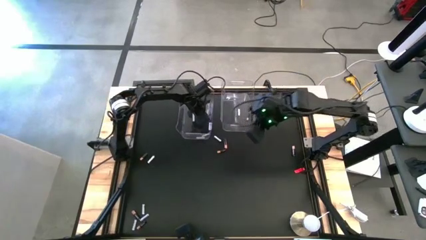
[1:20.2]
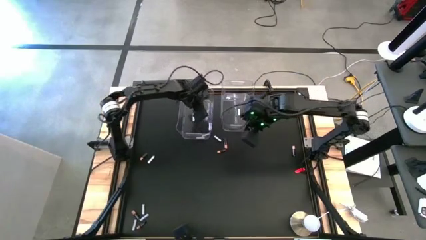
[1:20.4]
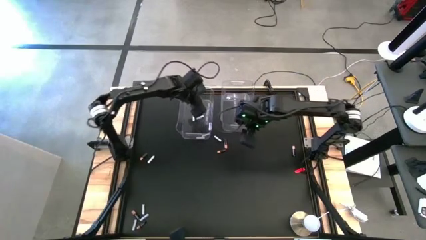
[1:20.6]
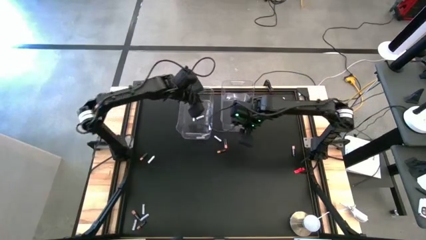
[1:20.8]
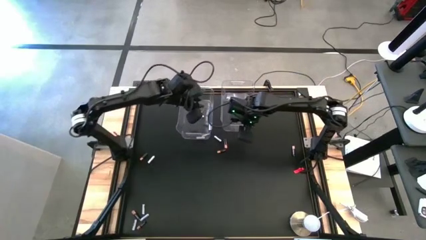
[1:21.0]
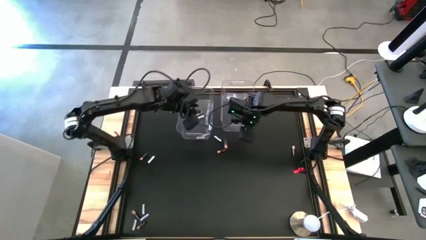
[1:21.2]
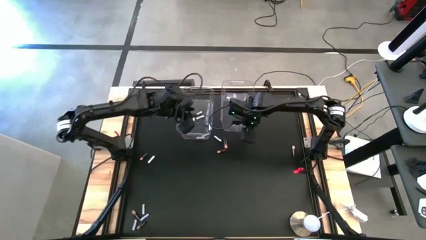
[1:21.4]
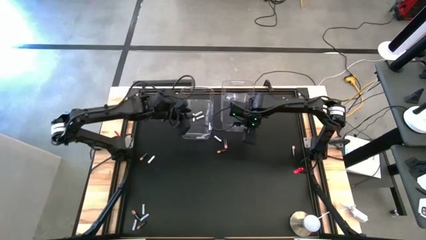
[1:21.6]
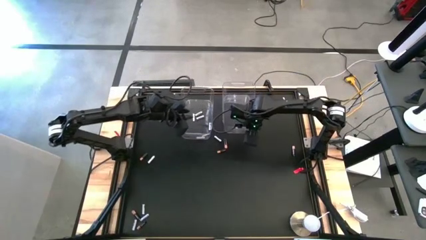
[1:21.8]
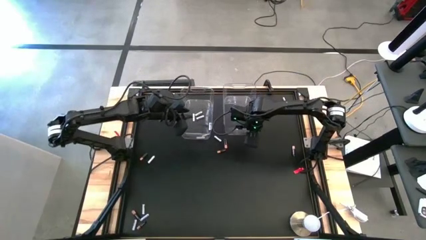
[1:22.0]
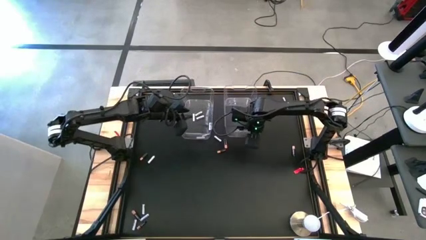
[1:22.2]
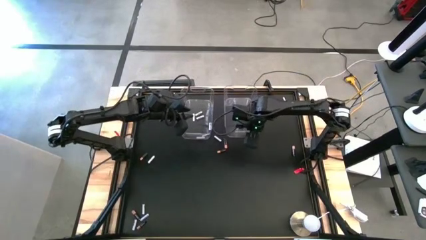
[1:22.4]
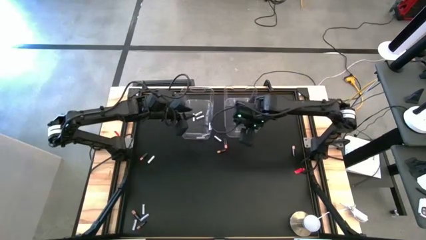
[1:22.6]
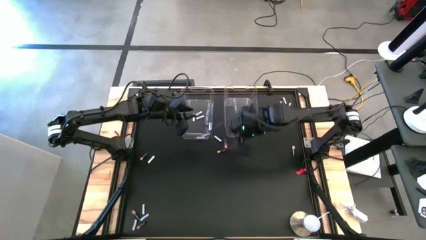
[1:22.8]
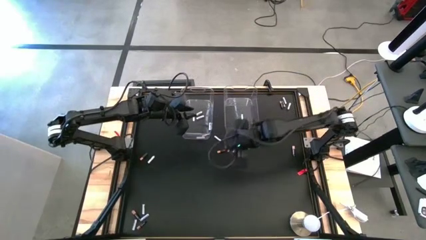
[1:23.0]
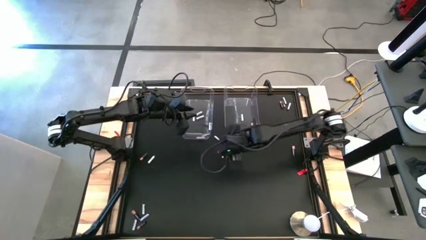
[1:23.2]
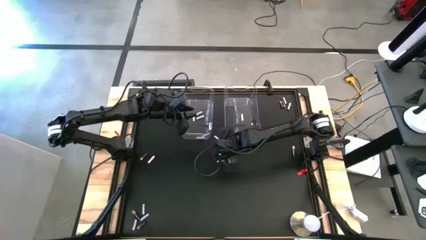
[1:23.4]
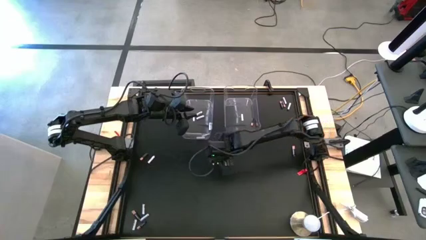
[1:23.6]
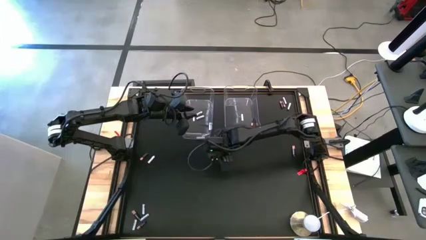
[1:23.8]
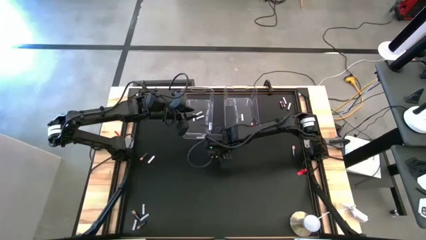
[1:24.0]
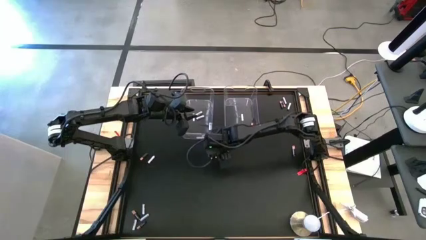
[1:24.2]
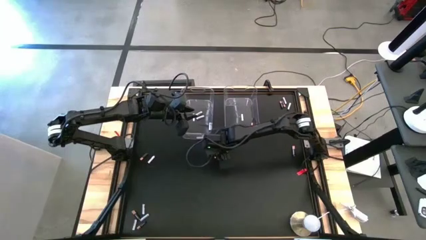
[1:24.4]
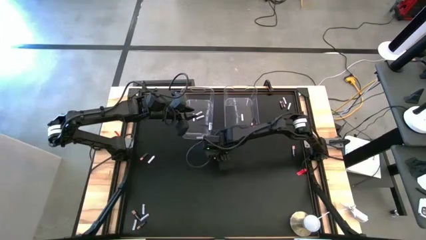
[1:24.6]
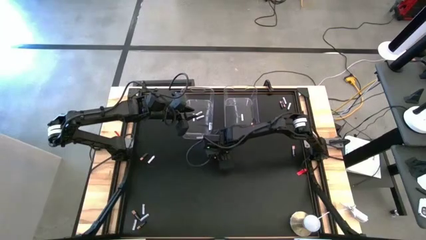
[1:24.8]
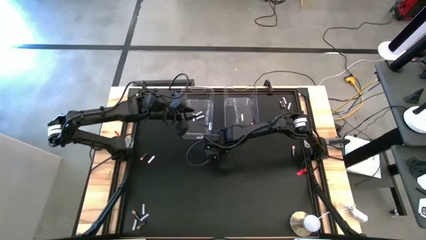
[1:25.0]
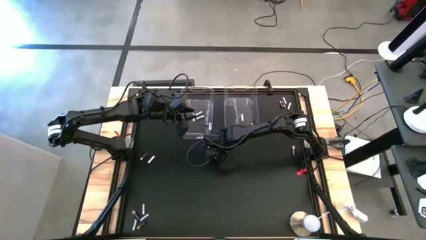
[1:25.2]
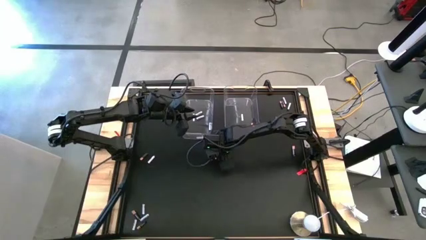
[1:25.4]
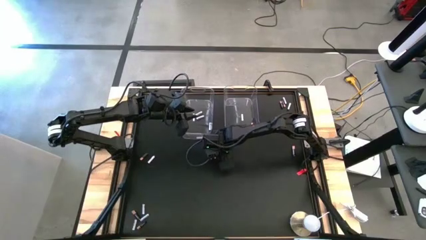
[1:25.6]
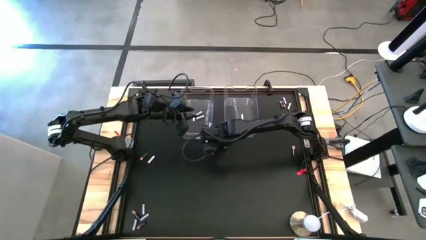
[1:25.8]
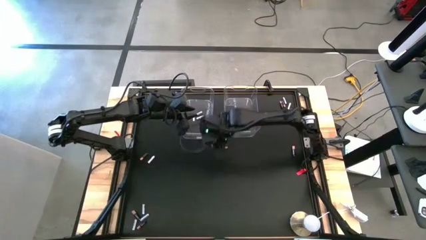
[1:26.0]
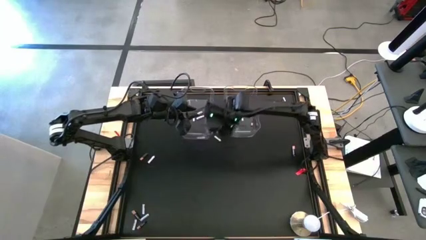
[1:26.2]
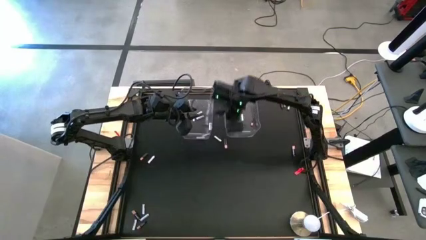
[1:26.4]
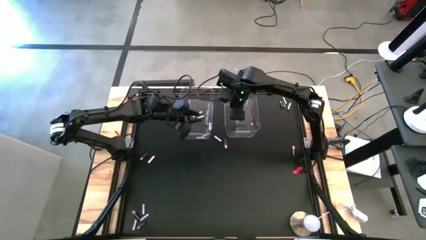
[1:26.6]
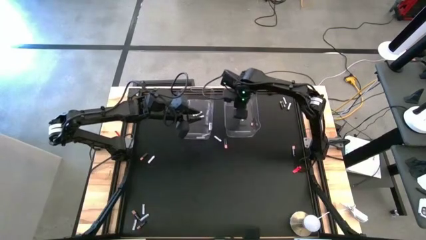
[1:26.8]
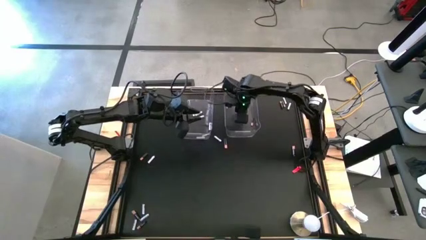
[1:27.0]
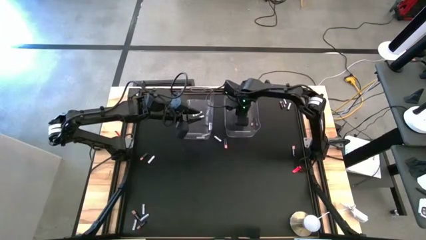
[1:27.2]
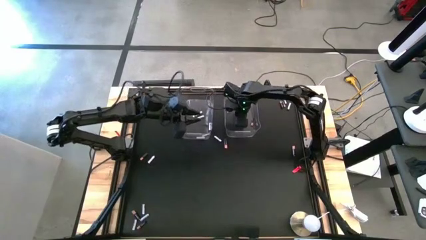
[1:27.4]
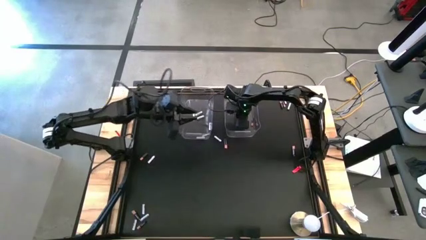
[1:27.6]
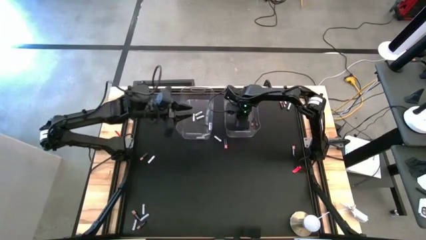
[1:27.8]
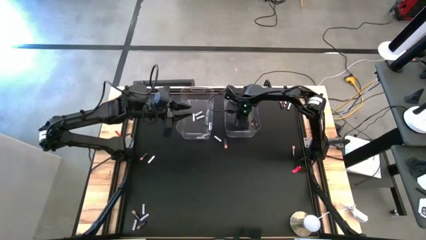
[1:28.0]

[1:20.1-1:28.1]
Task: Sort batteries
Put the black battery into the right transparent bin

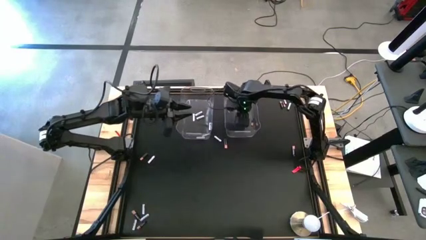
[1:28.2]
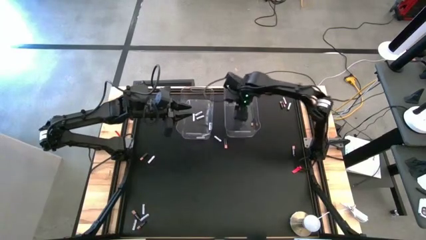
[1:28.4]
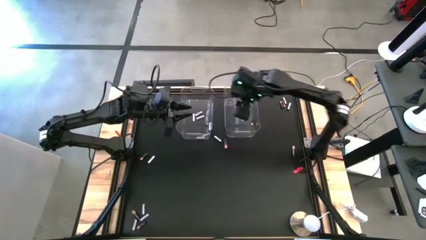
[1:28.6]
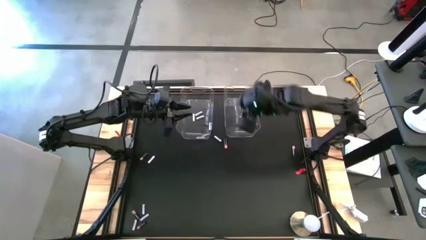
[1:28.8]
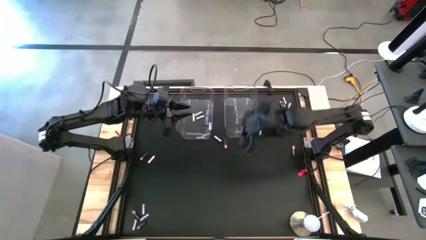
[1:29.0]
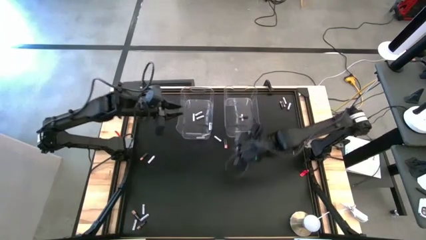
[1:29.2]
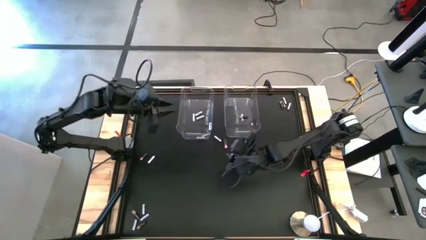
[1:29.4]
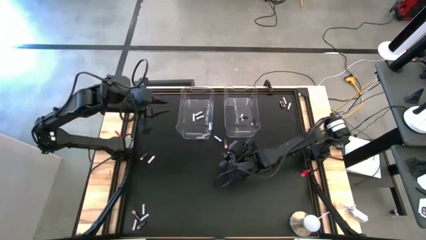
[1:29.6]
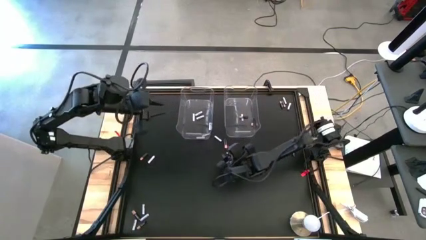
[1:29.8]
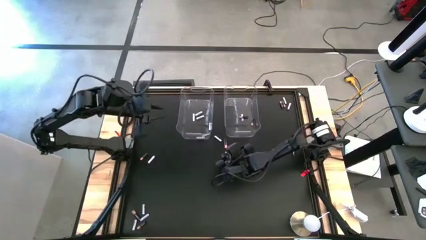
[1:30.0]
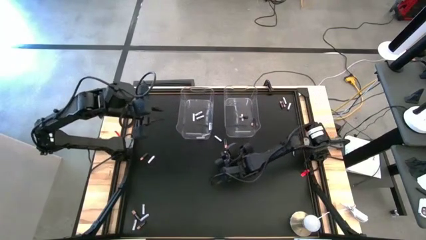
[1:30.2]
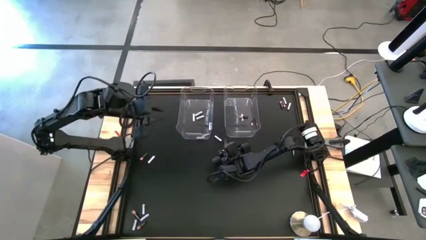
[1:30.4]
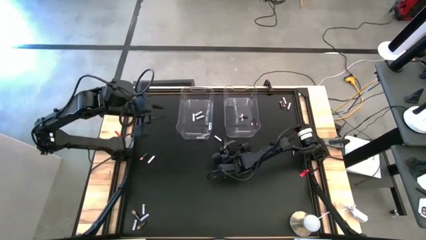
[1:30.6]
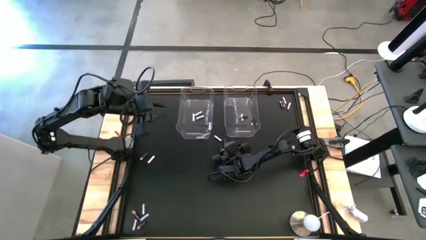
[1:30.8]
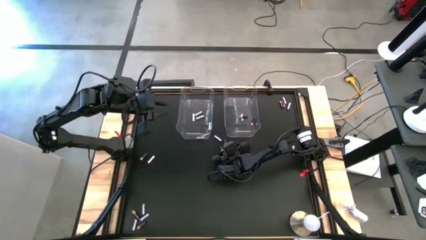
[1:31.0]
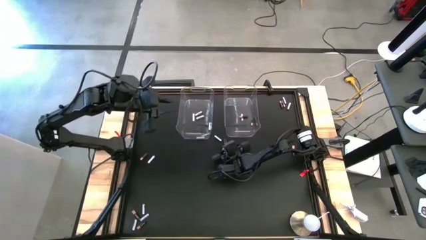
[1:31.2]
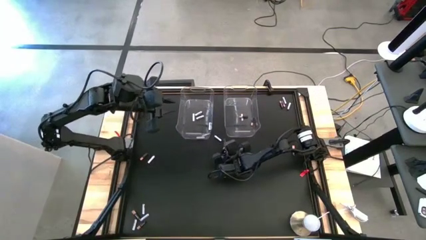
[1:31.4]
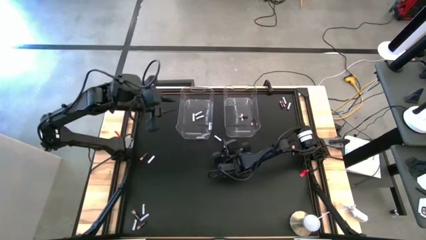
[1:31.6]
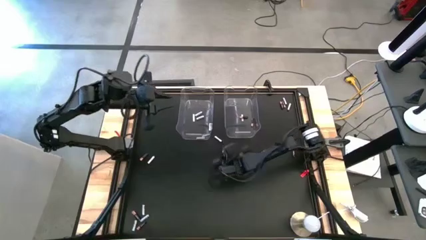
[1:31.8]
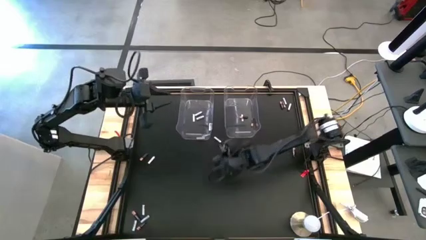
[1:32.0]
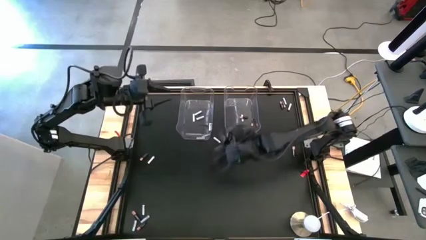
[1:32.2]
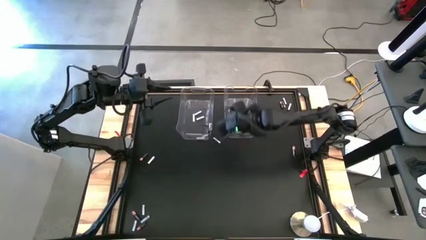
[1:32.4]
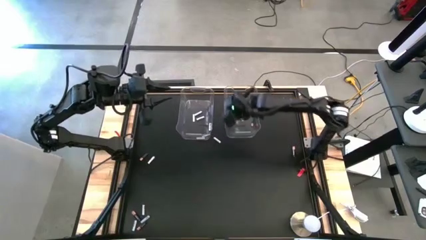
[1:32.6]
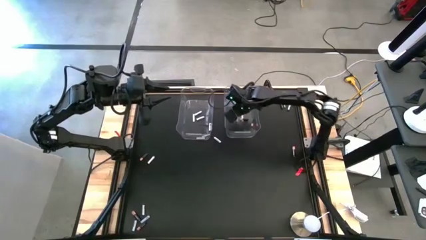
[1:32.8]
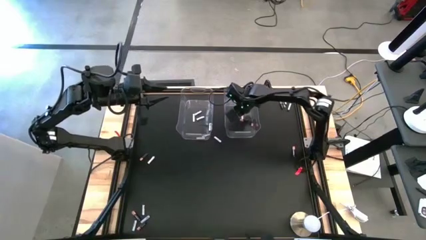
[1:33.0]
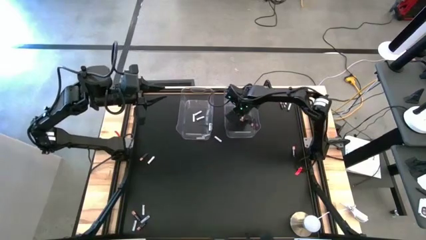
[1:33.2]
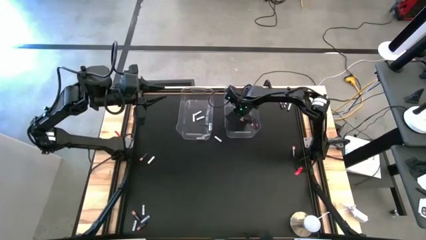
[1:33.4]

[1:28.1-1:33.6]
Put the black battery into the right transparent bin

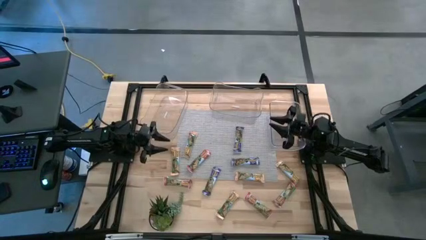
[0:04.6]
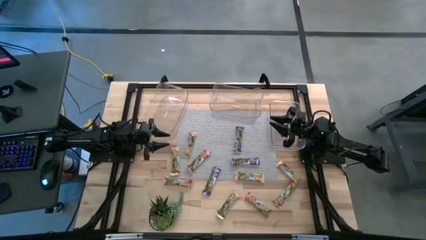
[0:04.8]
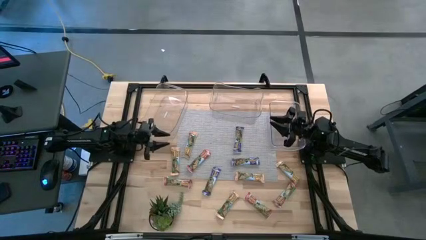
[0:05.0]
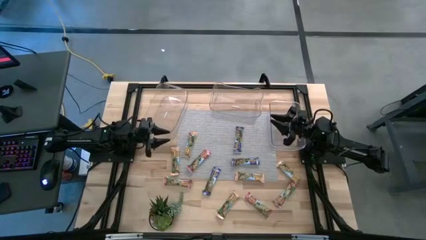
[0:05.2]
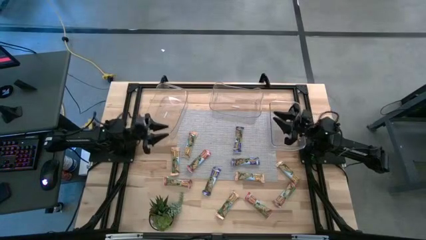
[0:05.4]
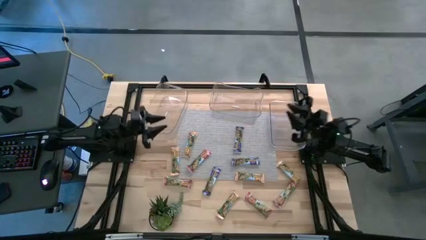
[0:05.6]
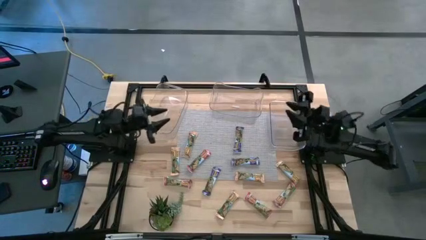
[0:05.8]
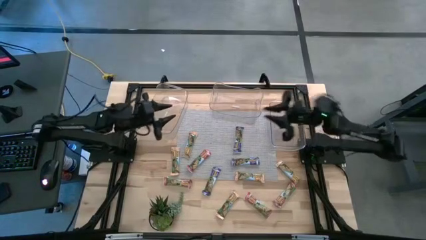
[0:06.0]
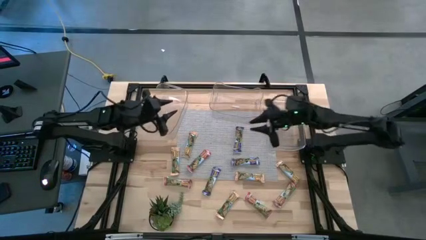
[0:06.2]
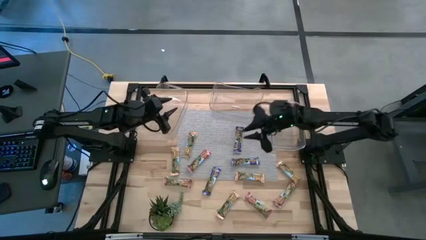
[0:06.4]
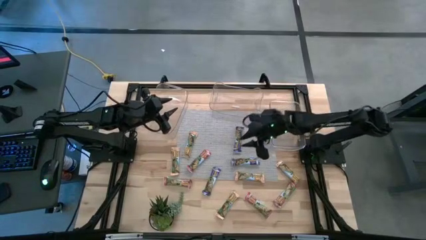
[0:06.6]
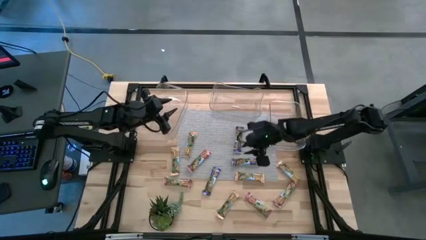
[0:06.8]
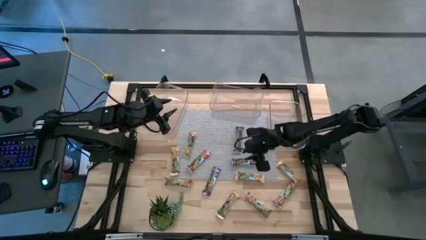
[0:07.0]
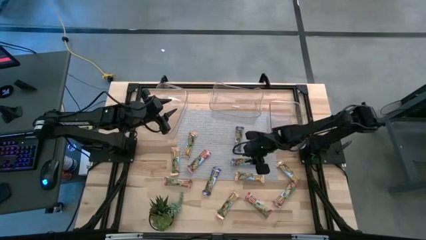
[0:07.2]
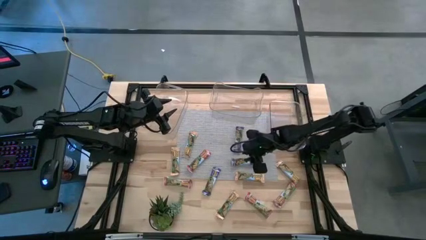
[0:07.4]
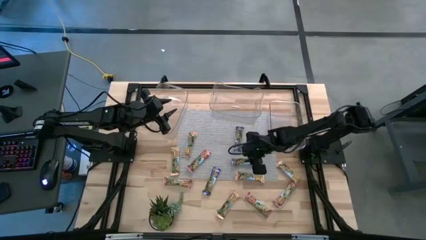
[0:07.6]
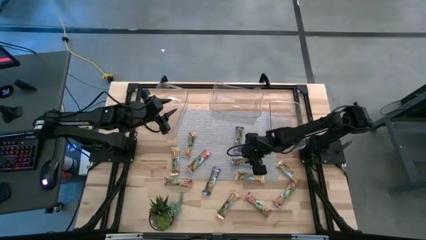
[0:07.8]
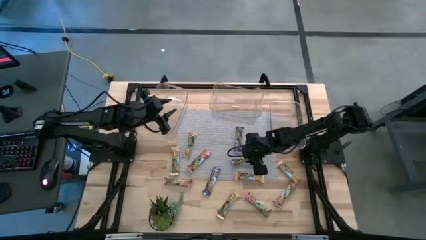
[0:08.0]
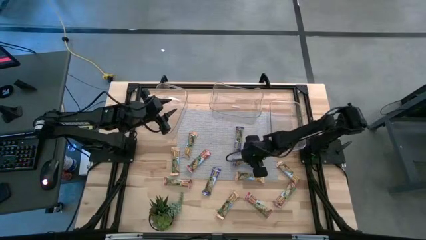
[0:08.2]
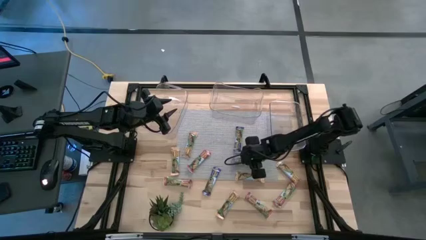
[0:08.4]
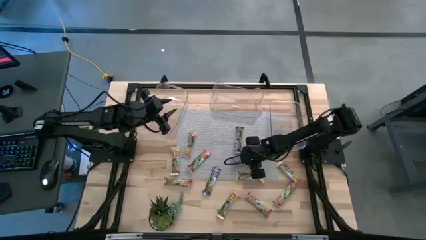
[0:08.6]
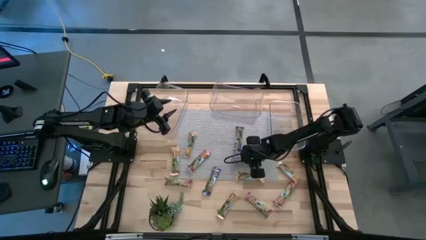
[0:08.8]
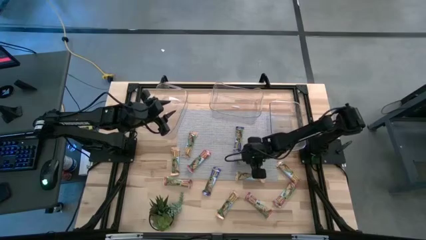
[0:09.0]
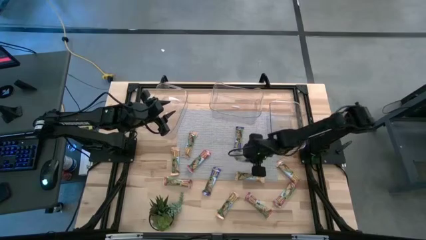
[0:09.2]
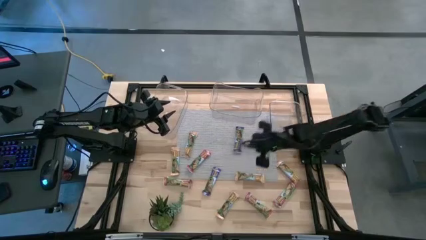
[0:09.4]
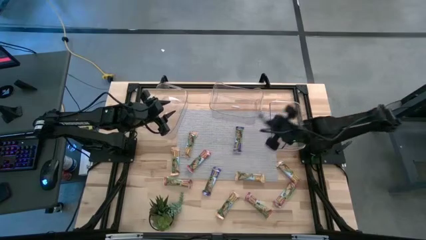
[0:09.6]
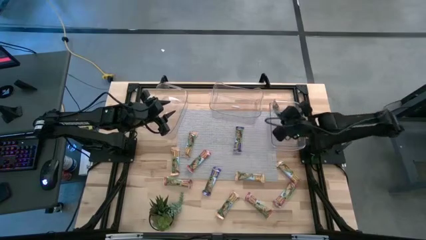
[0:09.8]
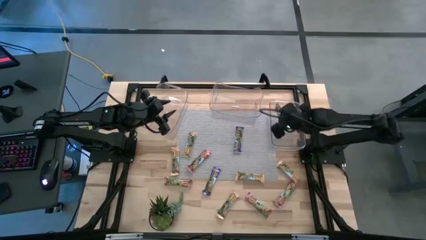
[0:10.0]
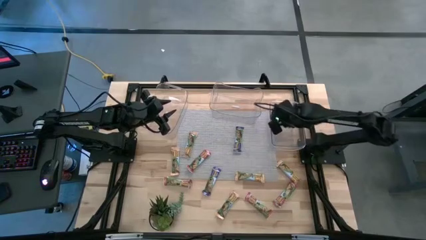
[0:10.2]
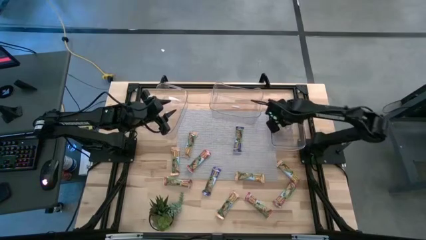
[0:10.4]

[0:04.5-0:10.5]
Task: Pick and place Granola Bars by type
Put the blue granola bar into the right transparent bin
